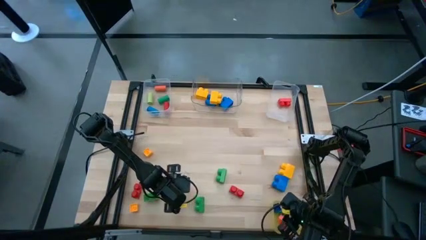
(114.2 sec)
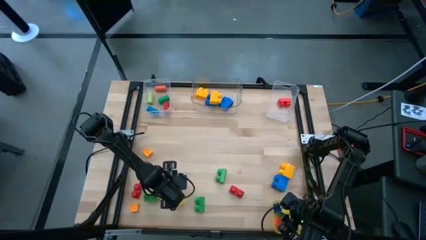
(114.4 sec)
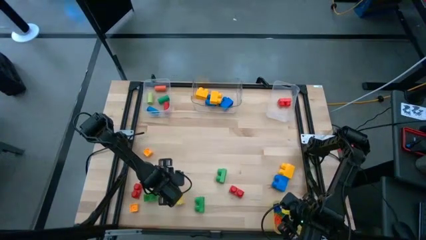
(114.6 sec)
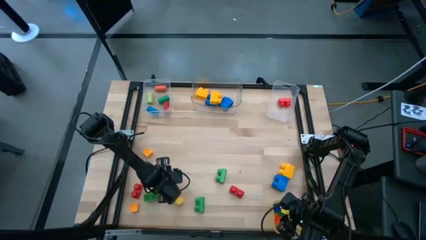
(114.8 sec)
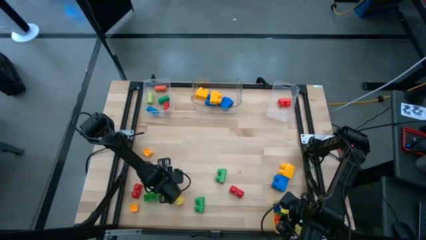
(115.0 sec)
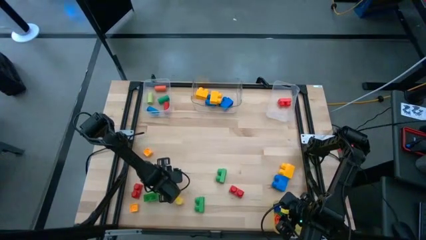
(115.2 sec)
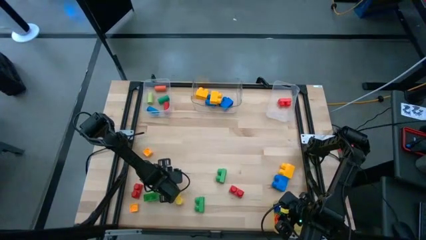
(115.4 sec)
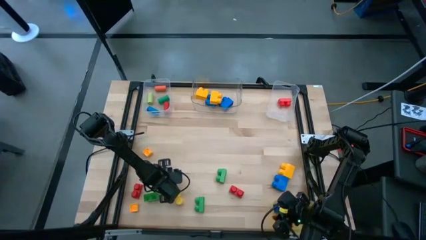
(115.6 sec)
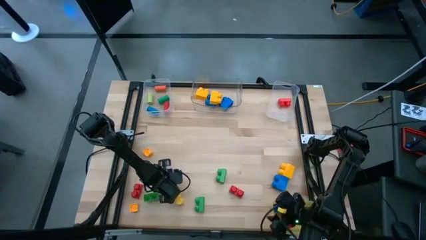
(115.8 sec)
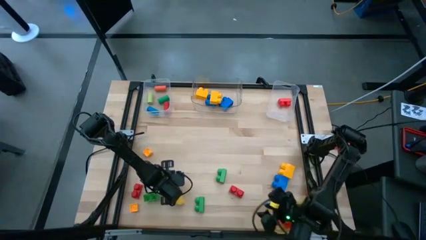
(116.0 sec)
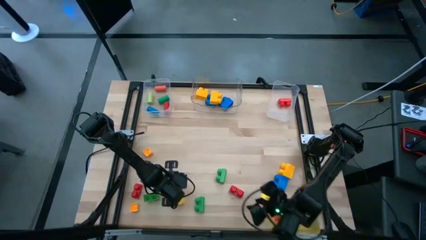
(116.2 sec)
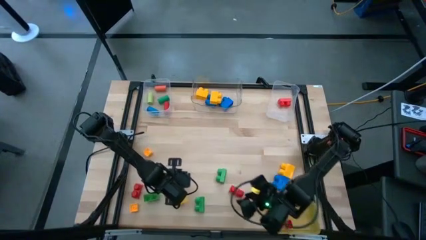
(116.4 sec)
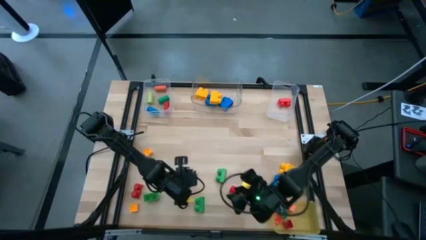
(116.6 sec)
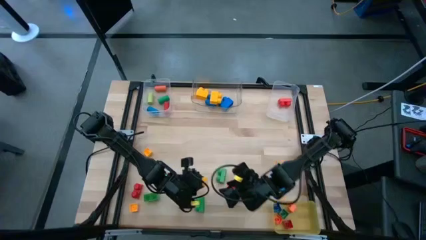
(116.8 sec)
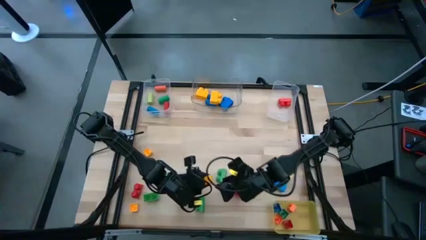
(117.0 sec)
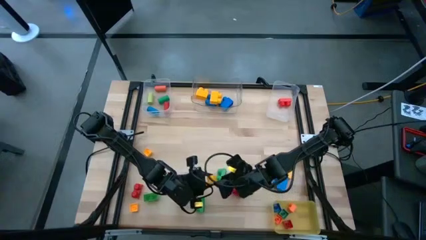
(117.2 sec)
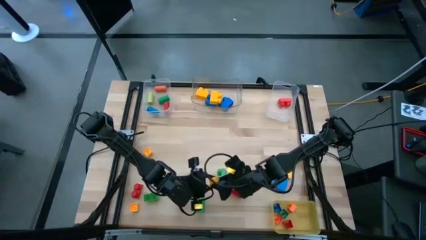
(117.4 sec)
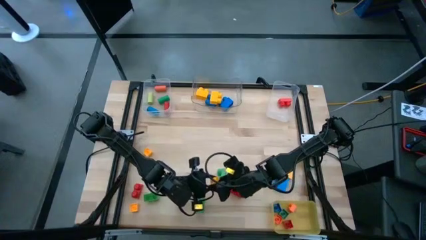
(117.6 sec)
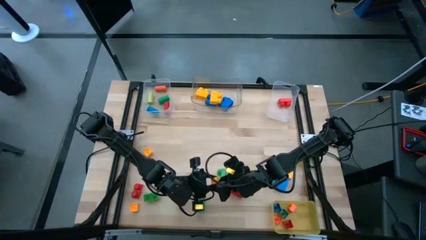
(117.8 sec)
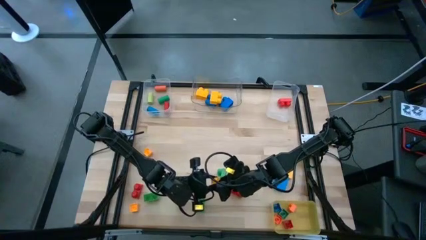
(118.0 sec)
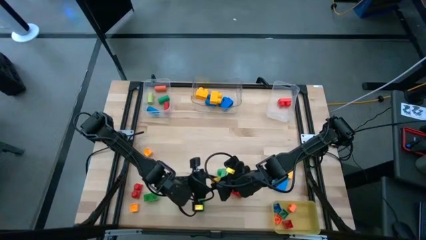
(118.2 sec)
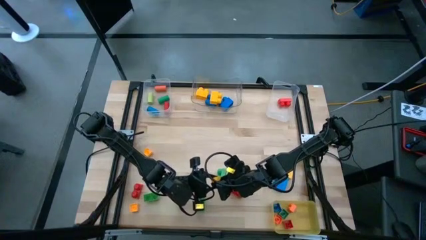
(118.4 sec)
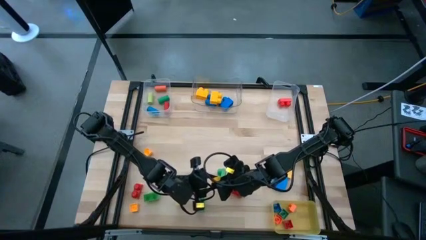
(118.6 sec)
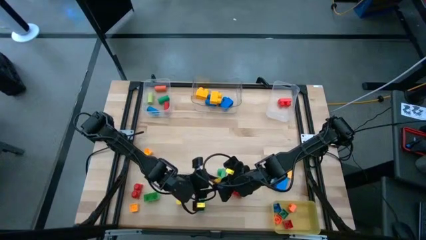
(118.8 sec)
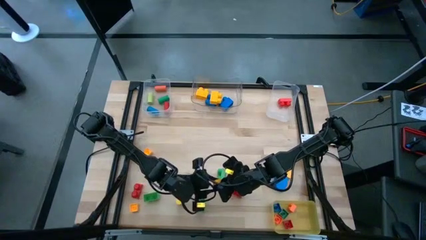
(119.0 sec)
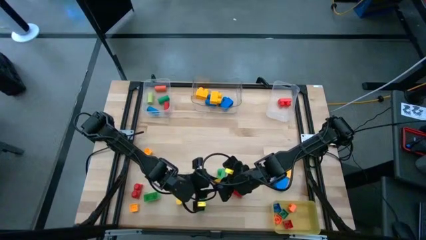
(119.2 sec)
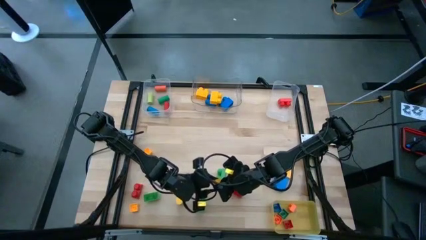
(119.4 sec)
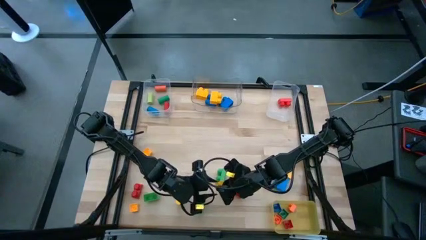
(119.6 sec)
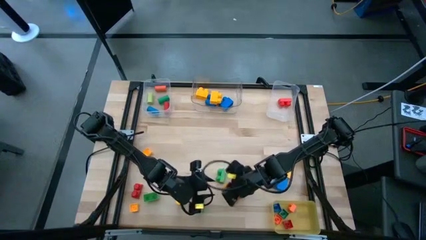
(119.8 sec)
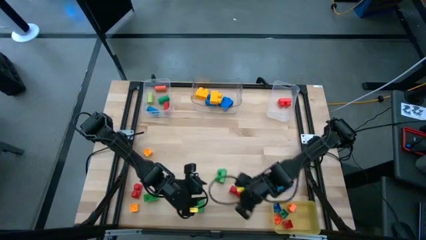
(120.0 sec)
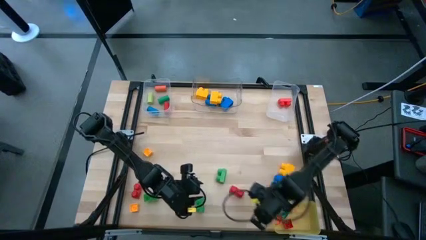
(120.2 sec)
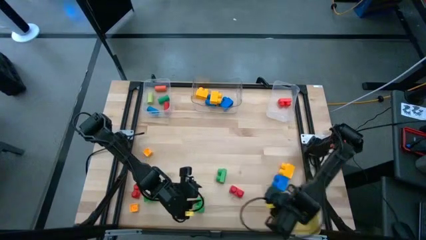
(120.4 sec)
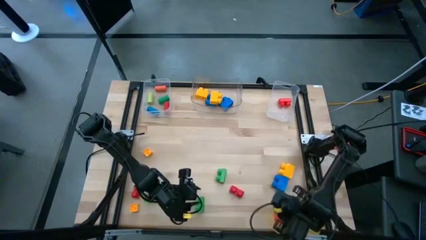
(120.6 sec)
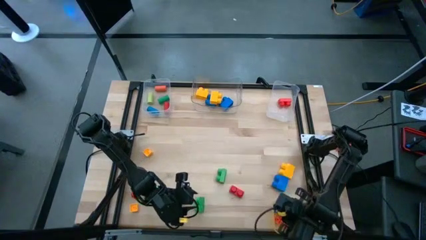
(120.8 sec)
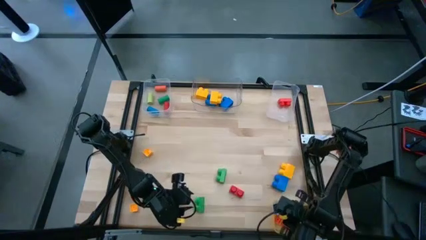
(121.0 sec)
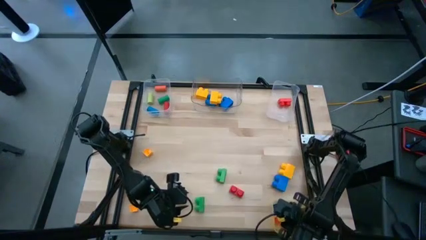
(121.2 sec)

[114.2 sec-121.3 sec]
Task: Sort blocks by size
Put the small yellow game piece into the yellow bin

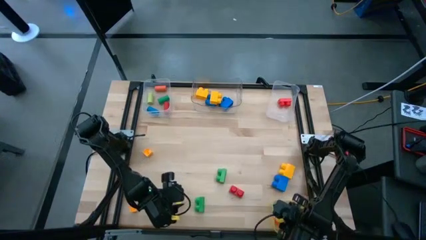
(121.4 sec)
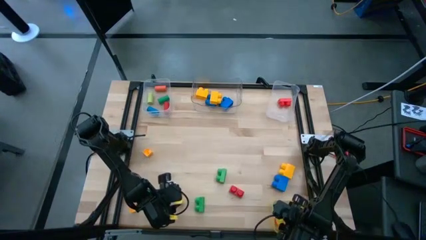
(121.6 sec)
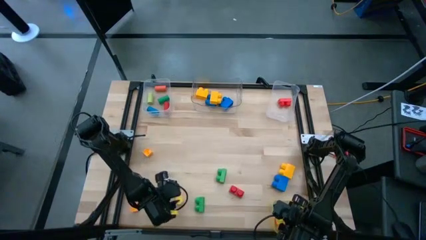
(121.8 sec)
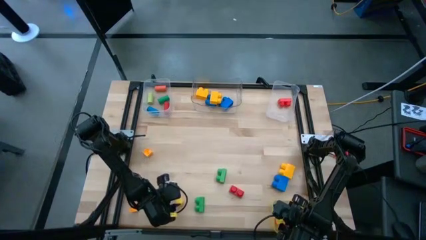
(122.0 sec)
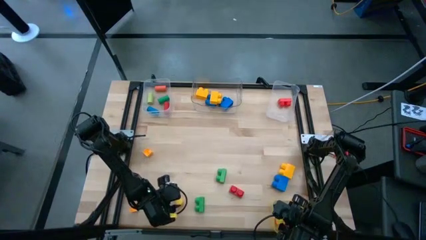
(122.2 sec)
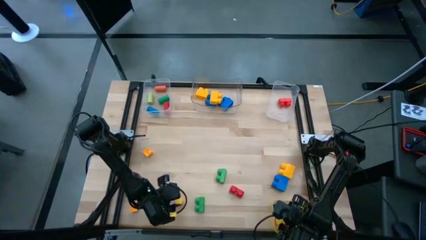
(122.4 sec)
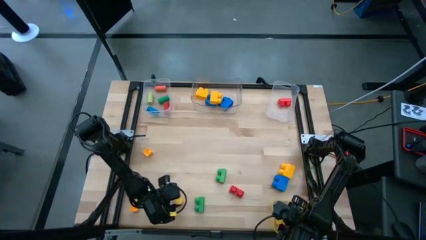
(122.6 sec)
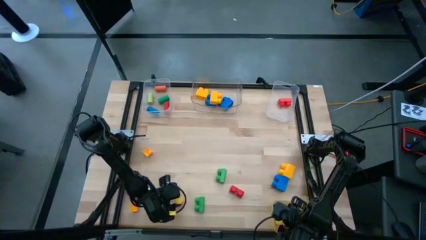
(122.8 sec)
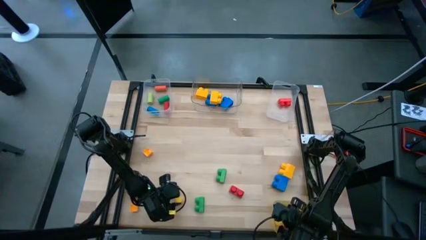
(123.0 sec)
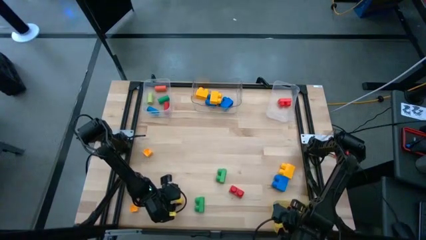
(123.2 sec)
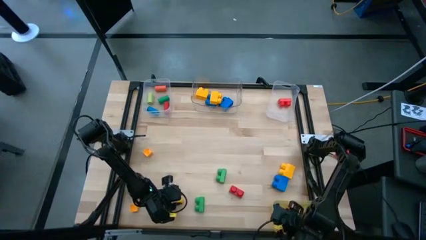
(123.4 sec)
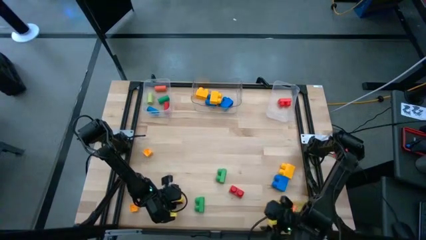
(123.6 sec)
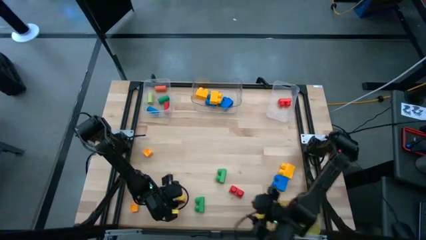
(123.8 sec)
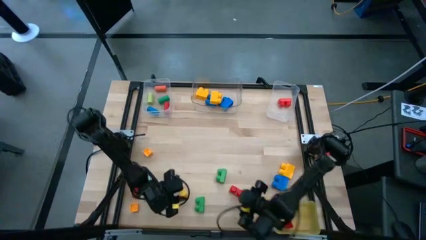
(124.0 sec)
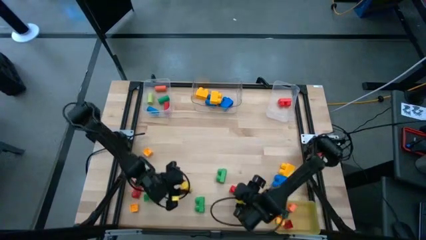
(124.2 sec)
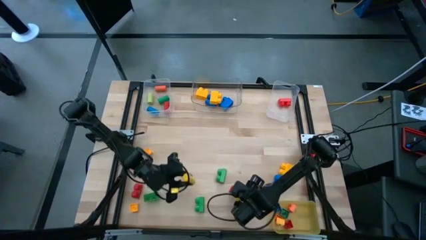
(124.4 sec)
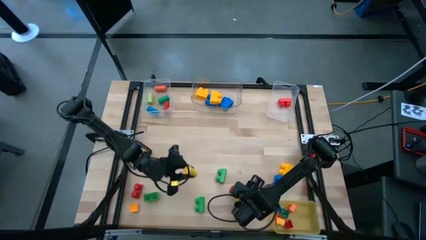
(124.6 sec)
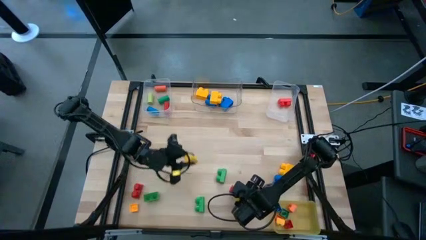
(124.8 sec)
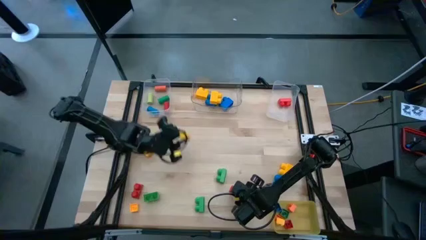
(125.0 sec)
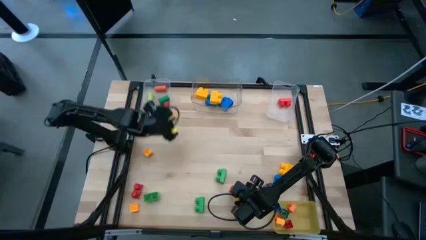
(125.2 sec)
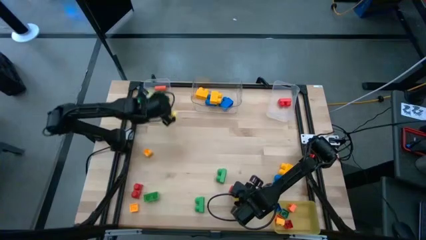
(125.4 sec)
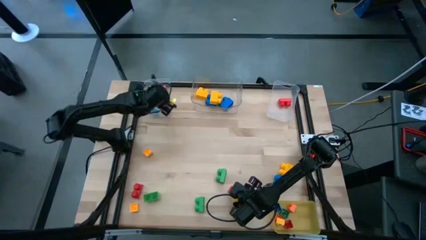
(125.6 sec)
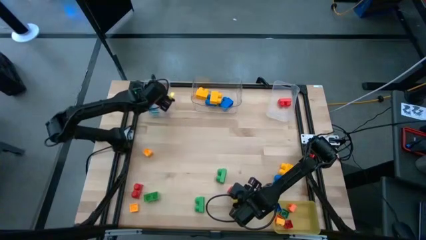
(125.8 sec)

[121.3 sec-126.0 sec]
Put the yellow cylindrical wooden block into the left transparent bin

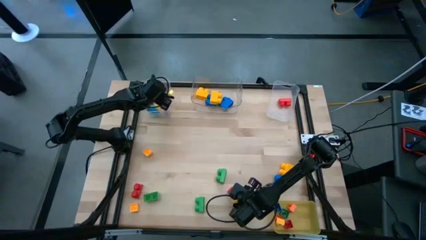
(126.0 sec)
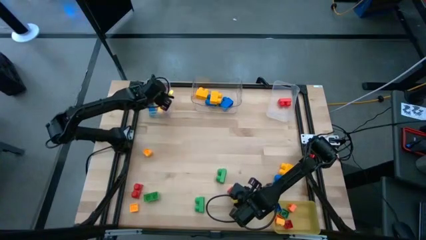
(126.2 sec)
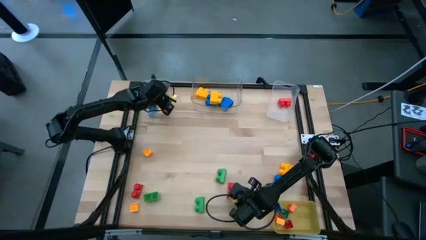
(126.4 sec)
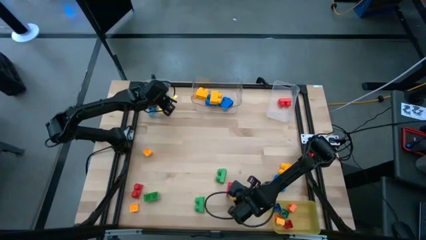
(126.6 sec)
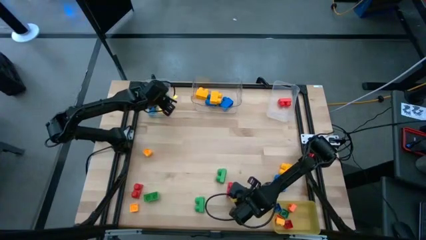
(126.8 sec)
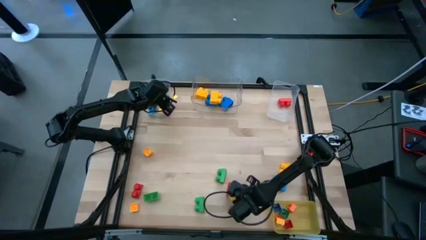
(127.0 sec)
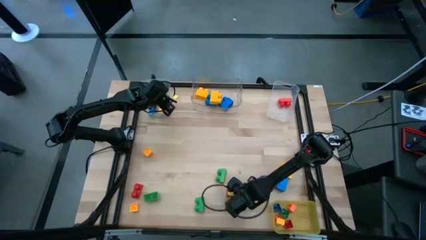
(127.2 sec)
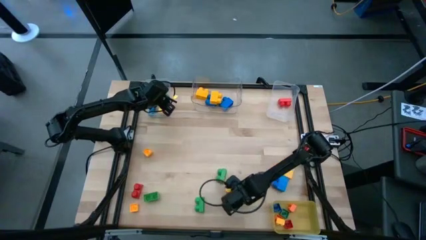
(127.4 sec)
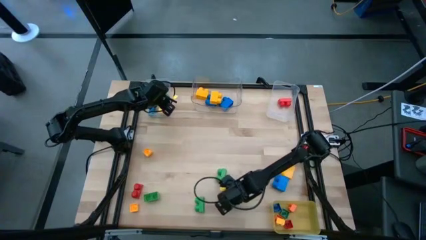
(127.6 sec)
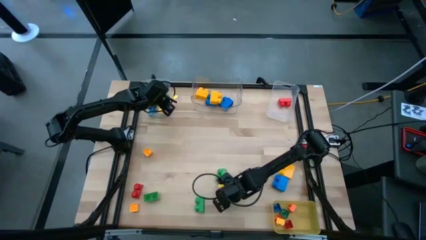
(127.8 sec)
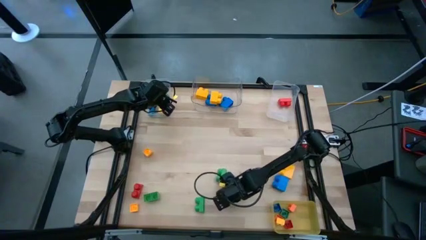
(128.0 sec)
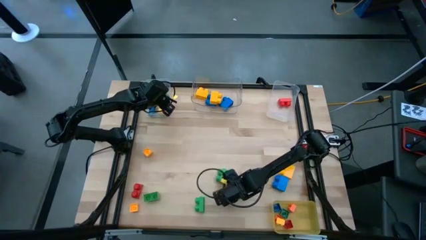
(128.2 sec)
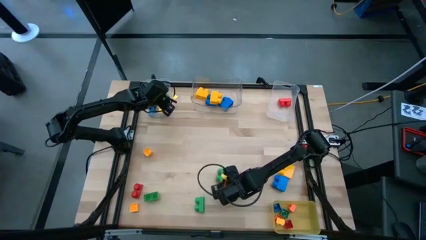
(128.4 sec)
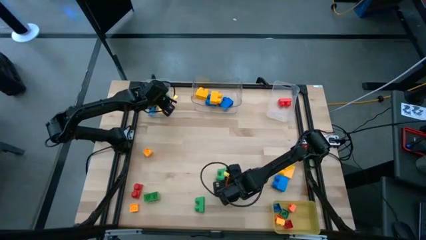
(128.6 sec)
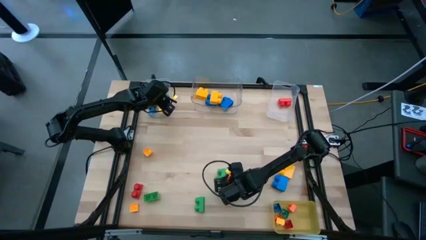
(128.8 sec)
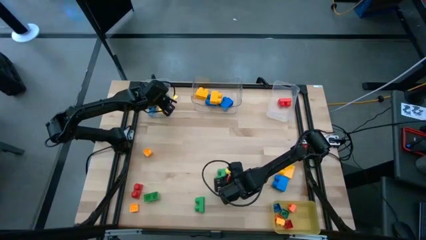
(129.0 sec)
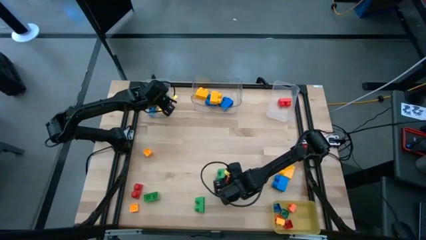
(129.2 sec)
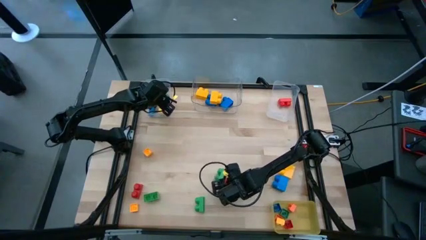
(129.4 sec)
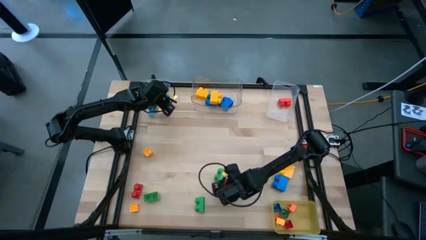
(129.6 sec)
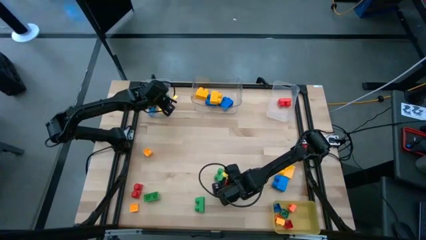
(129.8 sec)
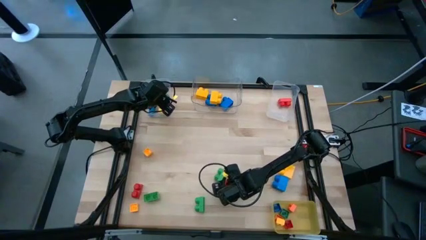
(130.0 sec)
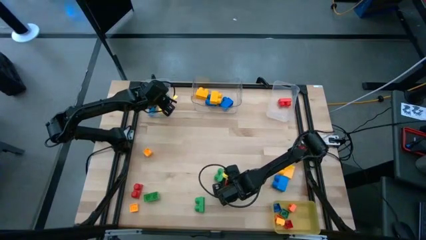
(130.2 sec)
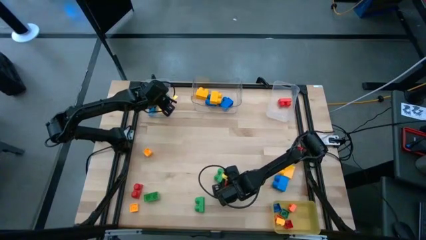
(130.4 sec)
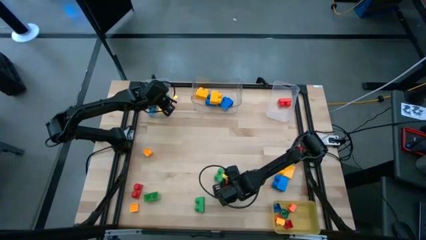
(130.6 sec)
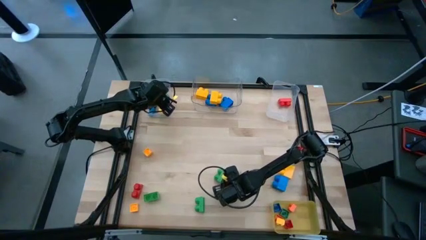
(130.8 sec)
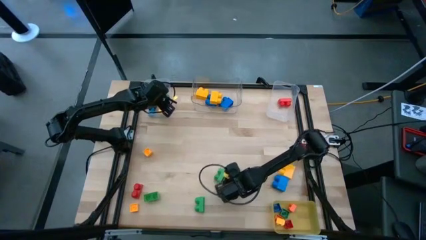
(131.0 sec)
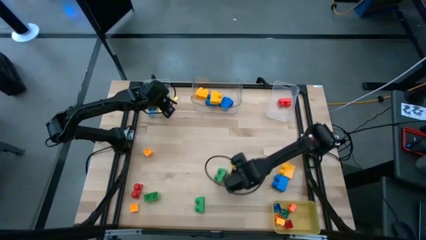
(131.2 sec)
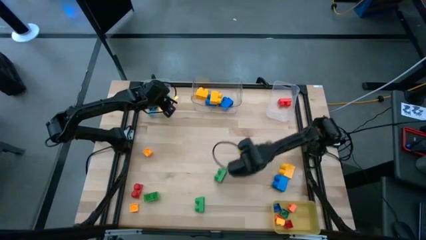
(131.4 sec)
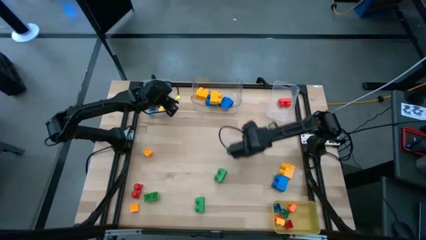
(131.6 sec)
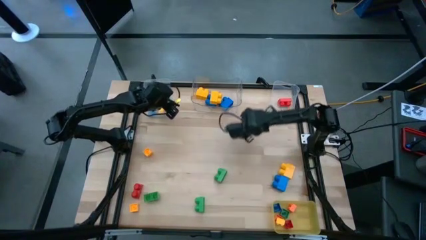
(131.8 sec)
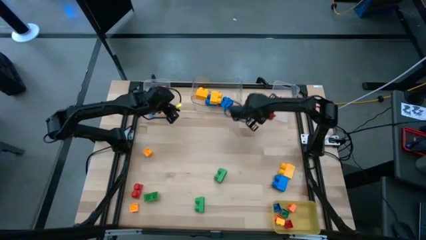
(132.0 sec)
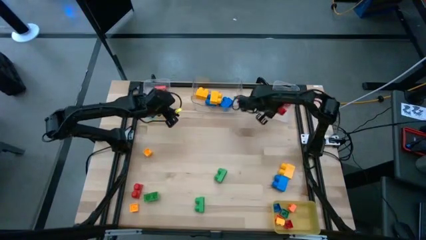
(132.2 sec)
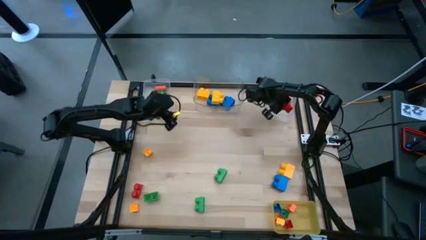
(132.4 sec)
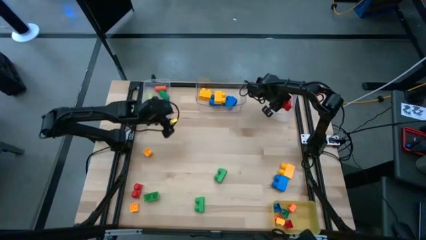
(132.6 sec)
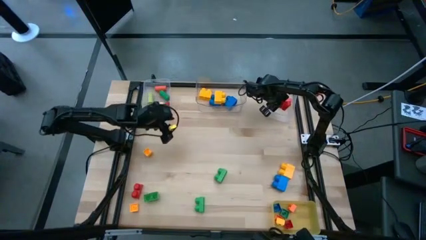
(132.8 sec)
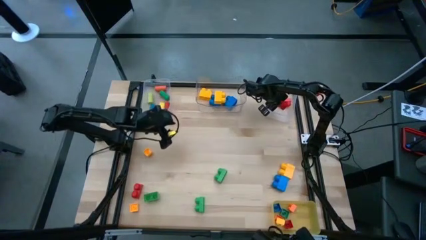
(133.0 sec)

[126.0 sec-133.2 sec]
Put the medium red game piece into the right transparent bin
